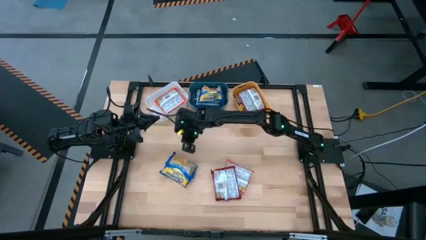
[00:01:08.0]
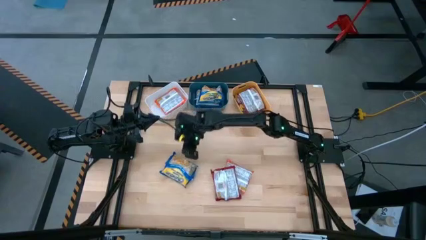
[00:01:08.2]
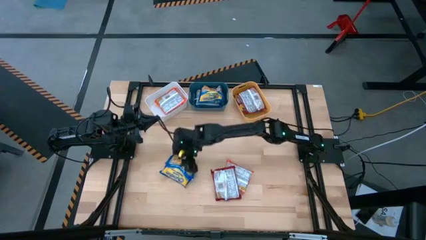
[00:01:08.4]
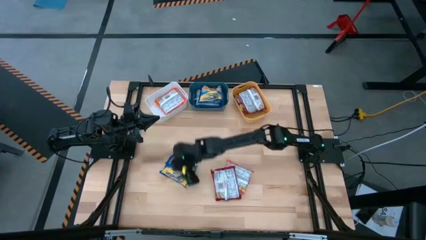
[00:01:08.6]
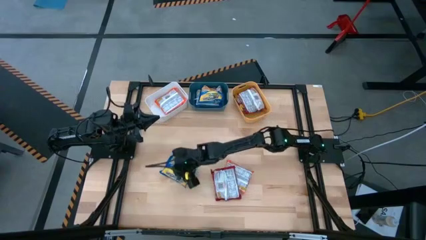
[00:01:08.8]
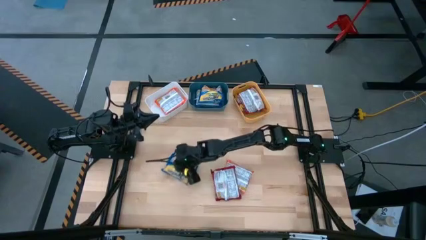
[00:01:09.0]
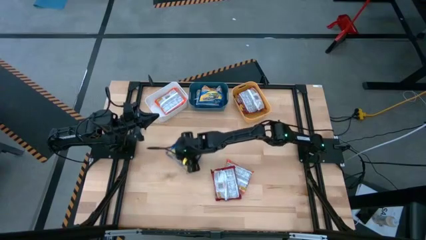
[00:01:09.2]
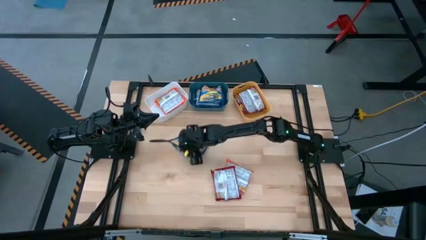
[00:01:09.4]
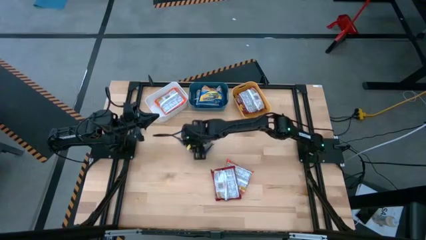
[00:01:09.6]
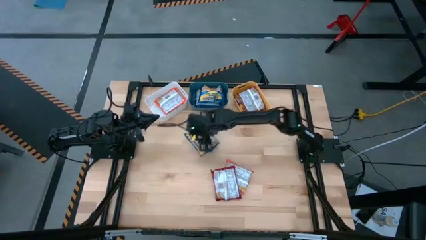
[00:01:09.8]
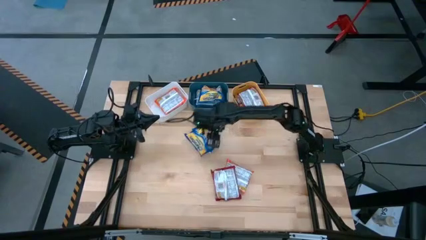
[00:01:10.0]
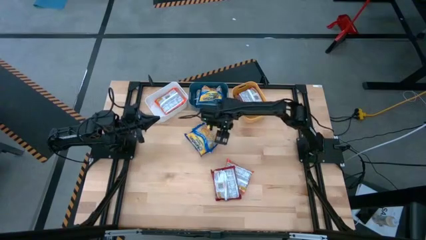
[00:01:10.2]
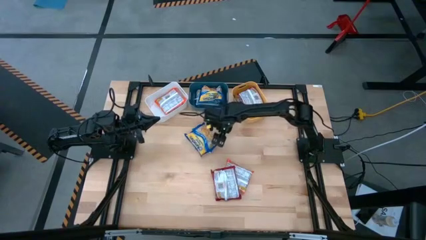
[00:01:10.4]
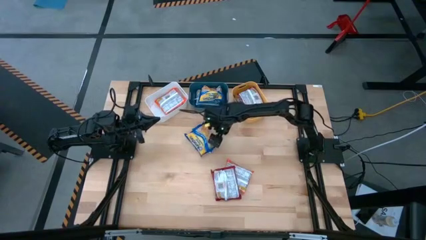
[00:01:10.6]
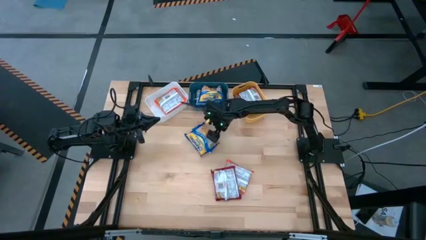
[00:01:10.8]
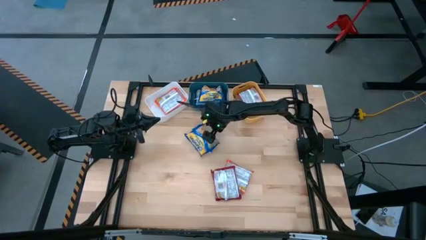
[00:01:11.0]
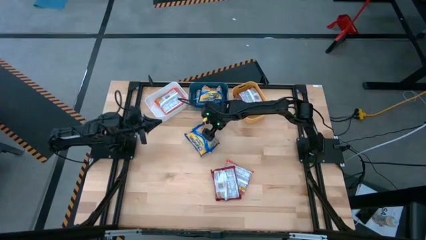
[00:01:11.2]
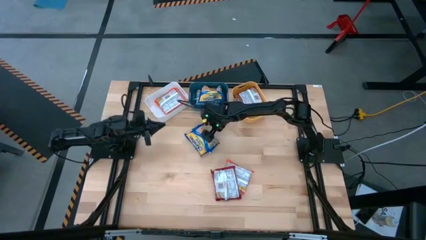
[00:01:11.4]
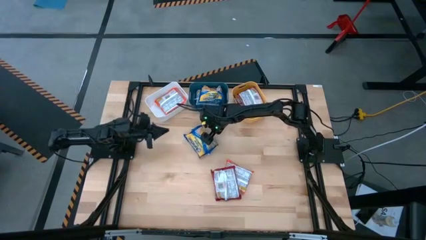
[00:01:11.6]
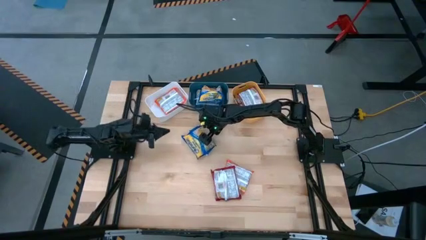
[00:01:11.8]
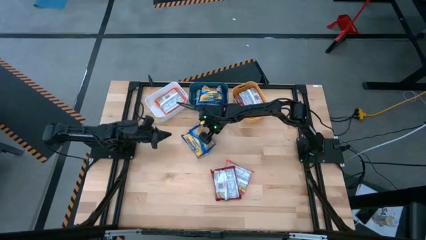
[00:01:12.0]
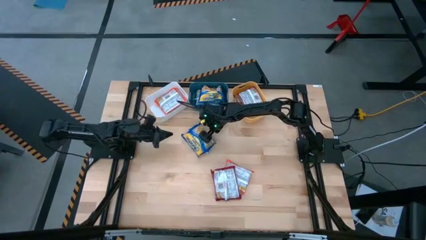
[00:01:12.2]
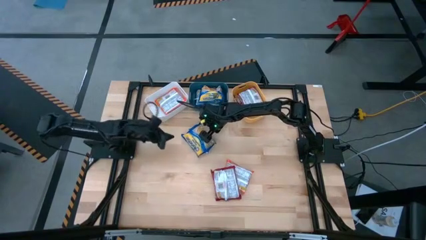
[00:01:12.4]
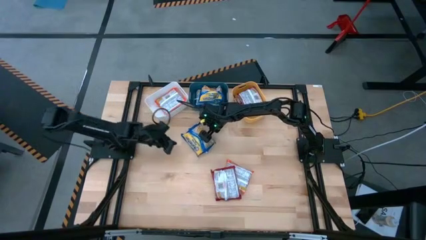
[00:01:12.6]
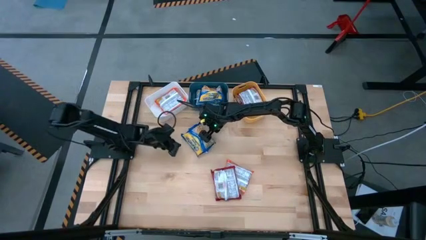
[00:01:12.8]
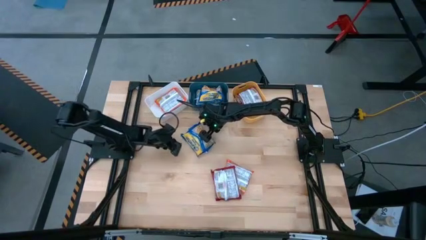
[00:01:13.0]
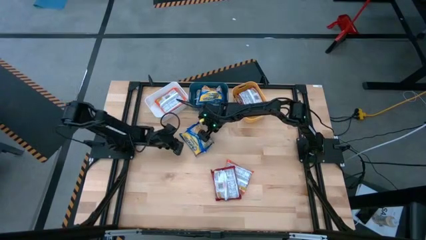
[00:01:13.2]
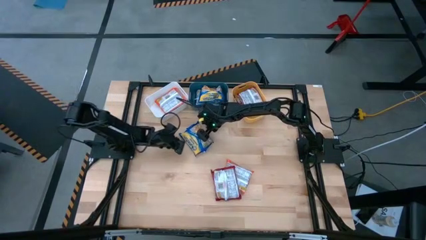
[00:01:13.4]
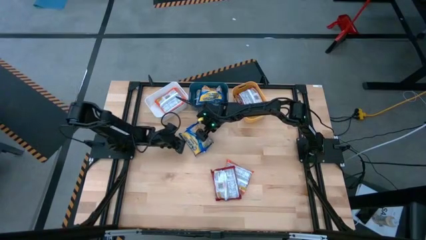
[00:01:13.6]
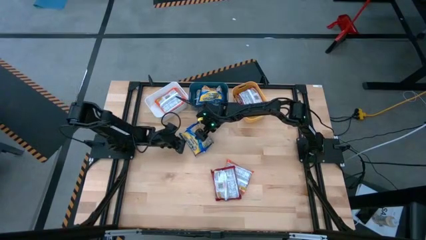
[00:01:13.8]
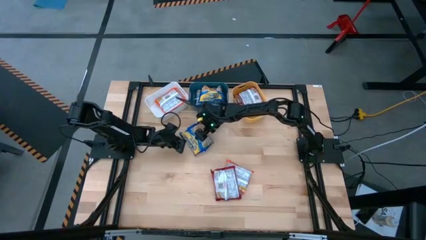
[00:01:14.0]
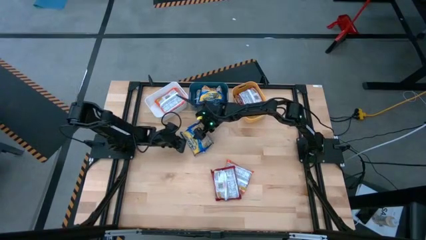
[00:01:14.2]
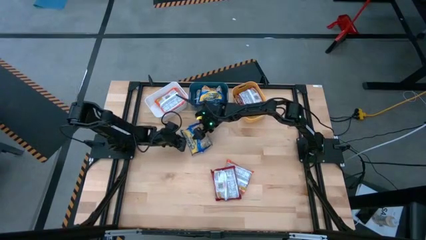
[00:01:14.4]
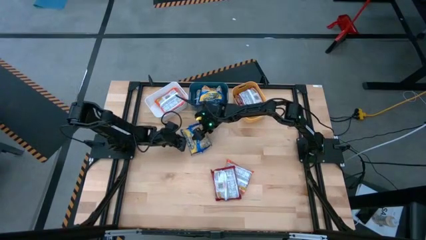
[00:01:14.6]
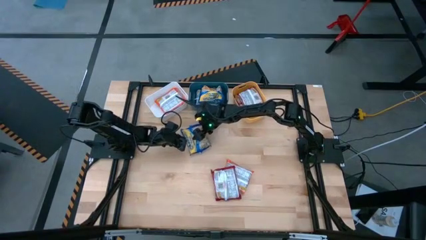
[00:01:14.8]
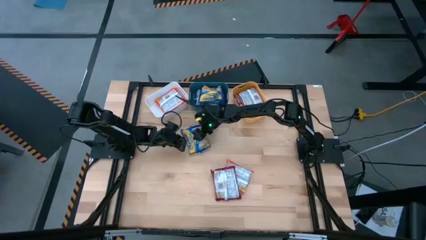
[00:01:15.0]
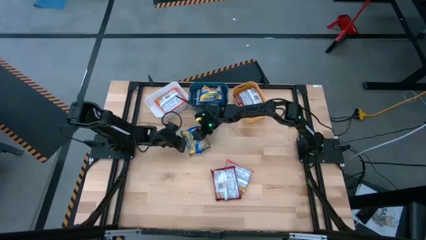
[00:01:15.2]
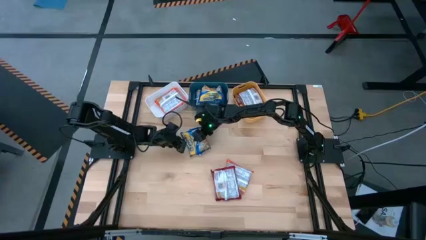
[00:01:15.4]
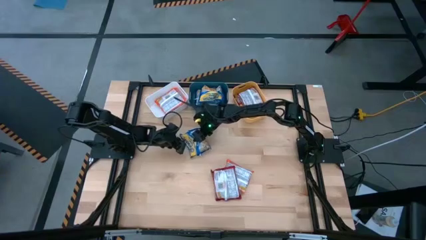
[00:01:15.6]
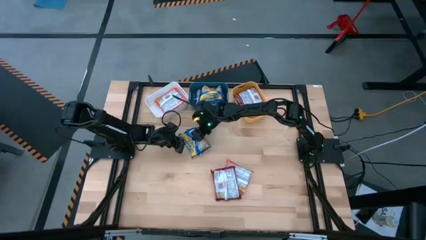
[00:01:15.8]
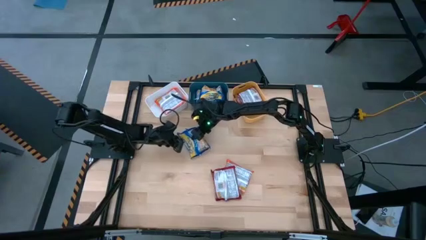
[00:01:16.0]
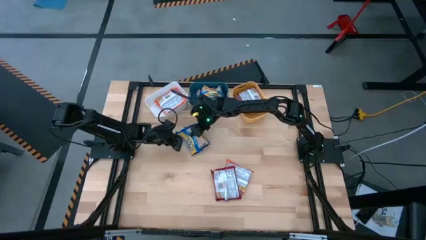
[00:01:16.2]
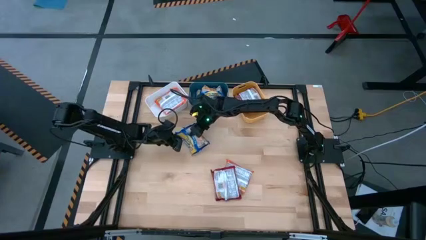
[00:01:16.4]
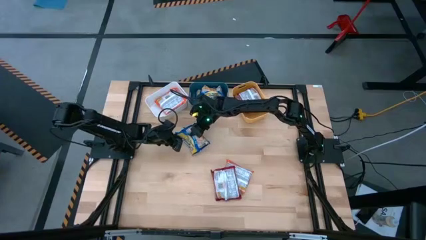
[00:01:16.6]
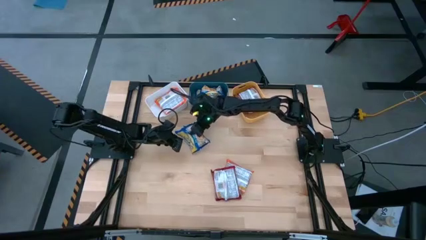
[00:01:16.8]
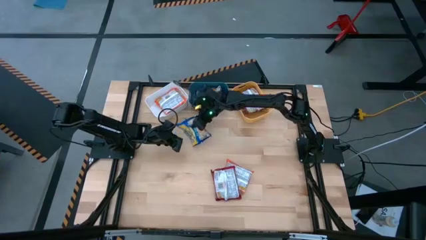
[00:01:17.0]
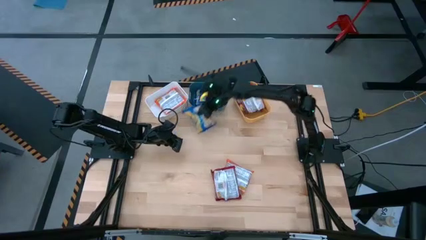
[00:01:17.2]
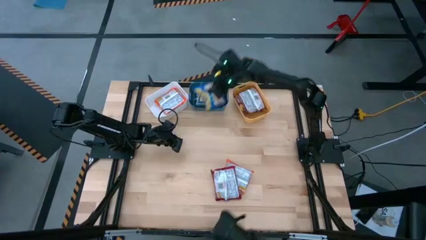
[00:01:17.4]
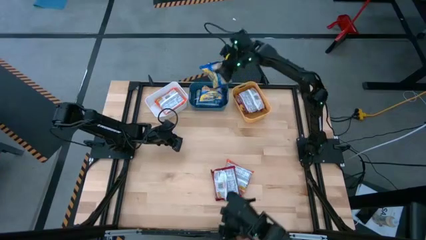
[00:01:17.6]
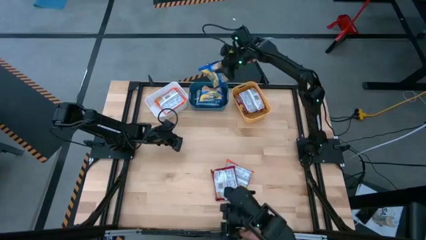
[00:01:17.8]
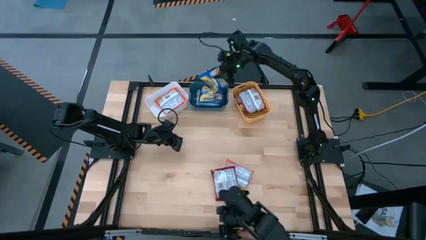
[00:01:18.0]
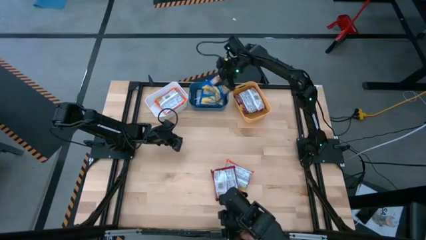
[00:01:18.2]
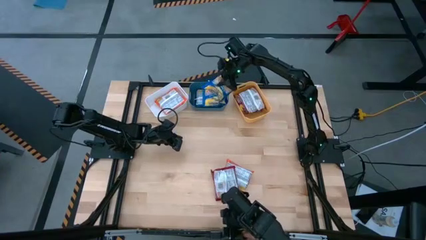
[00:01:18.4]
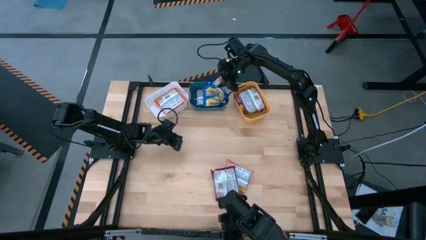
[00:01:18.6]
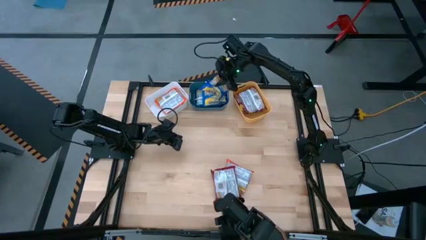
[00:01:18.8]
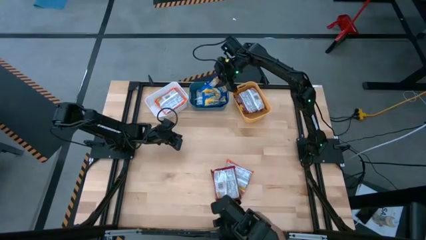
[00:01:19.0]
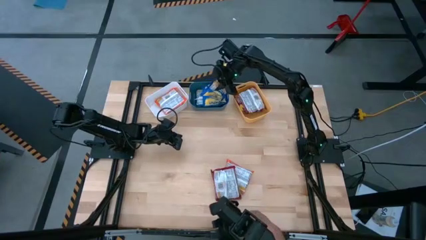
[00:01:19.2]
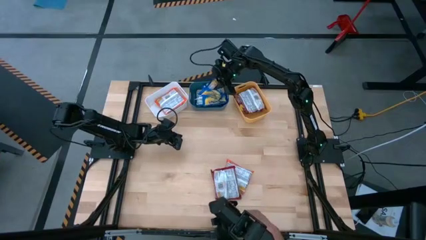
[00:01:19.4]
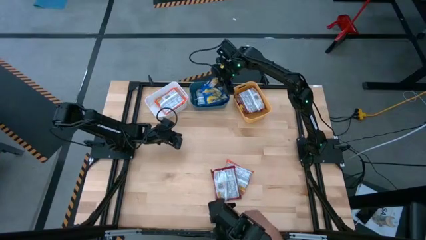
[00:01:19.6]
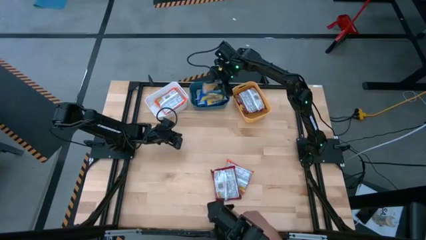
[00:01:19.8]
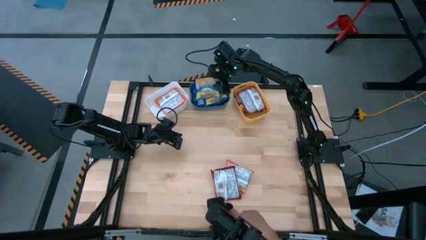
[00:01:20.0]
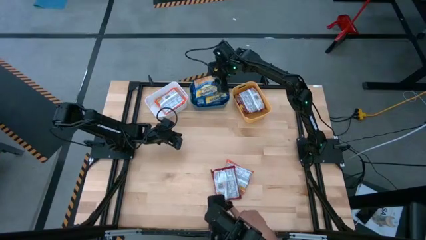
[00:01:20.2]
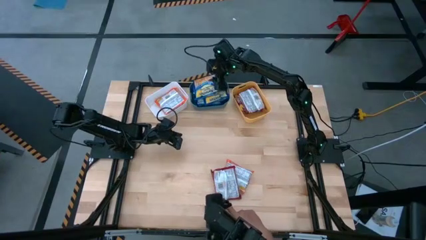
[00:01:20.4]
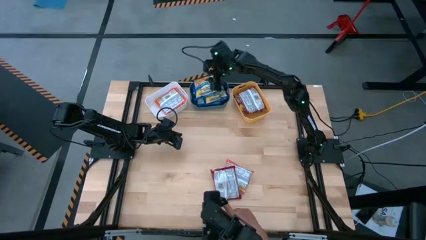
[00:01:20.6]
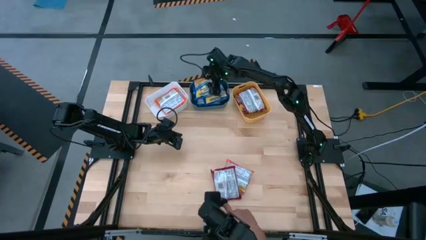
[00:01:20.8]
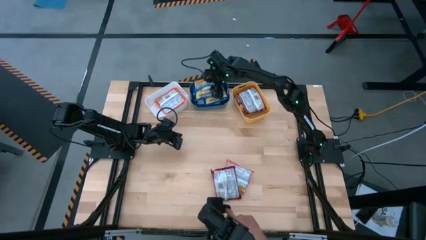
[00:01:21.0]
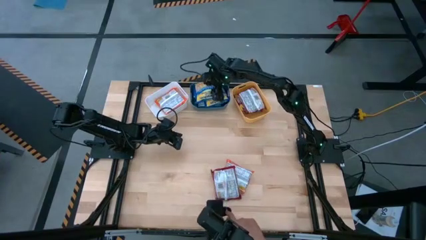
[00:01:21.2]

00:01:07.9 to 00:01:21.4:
Task: Sort Maruchan noodles
Put the blue noodle pack into the blue bin

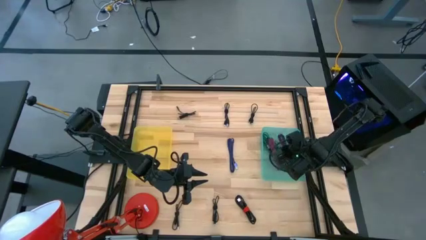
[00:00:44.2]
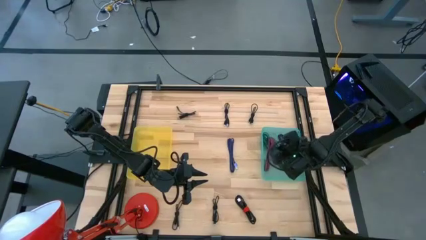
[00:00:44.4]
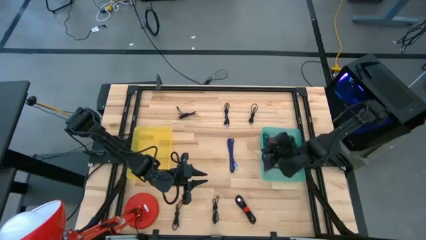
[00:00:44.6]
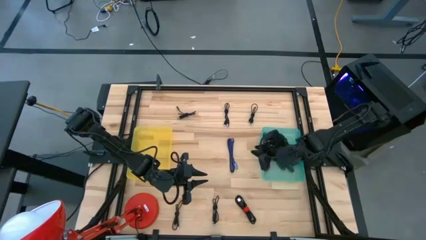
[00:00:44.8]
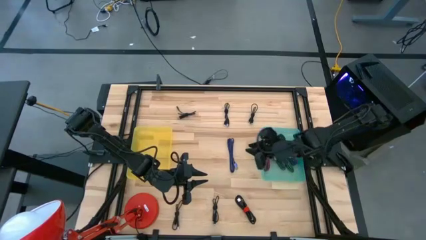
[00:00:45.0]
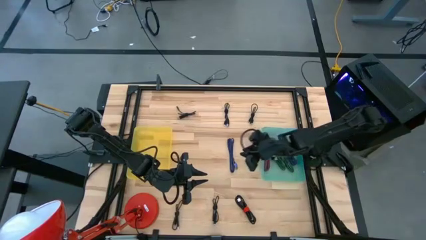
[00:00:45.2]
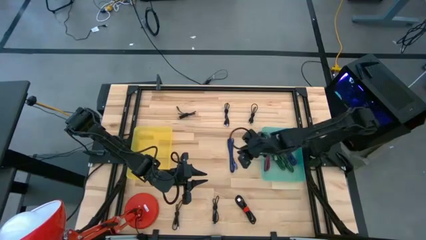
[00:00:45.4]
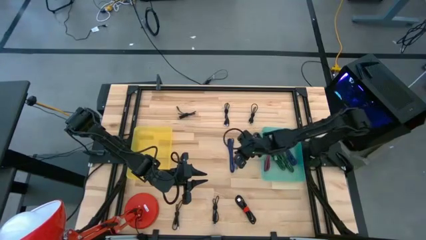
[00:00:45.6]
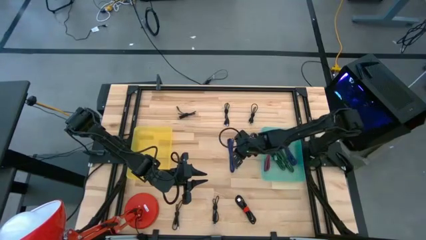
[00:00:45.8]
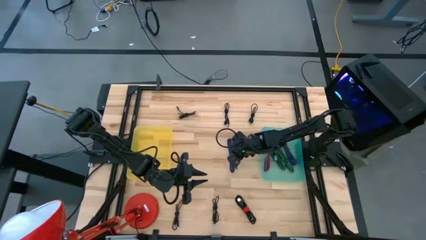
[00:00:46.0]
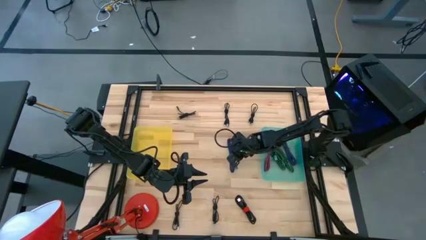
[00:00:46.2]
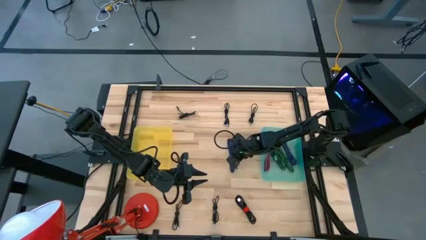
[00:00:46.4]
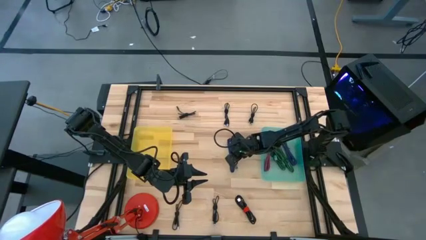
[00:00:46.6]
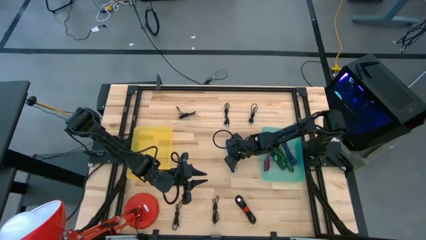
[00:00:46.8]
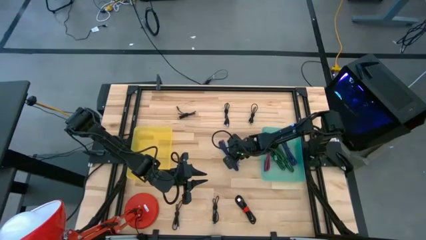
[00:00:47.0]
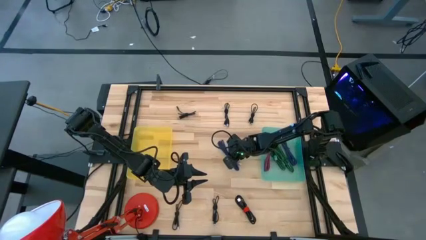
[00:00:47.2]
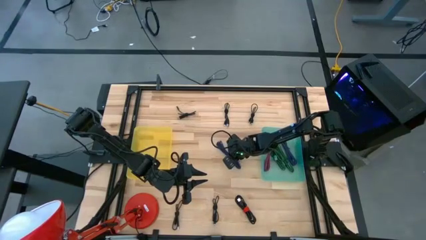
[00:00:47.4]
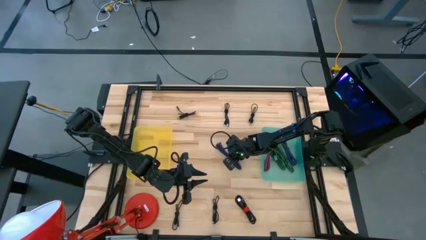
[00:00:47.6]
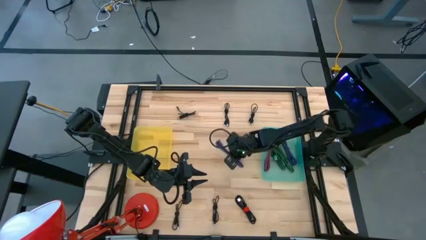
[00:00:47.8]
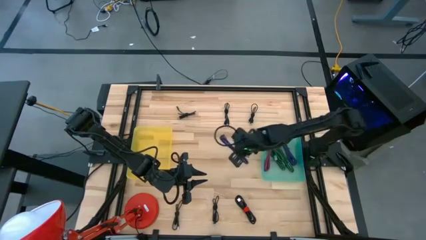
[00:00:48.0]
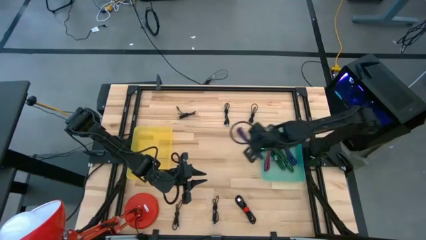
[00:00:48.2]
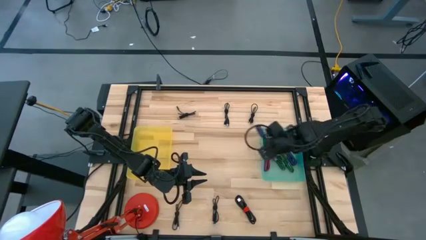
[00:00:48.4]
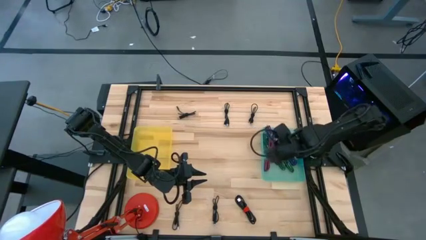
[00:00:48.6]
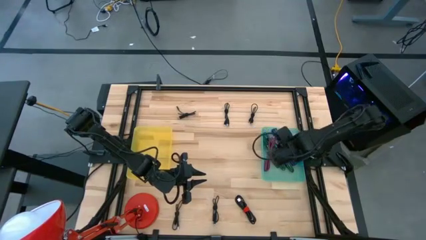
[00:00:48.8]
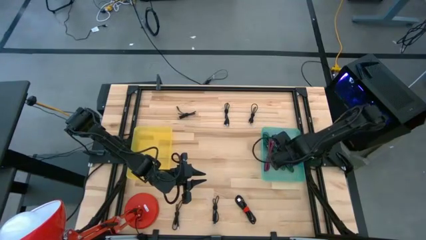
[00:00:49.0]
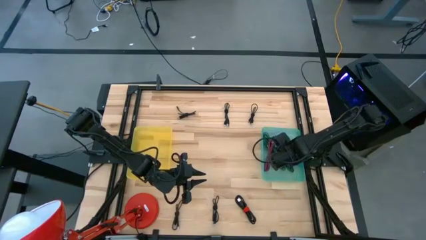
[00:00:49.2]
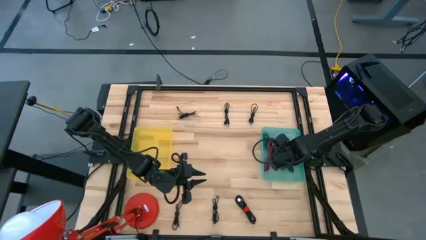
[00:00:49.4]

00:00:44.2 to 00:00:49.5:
Task: Pick & Place USB Port
Put the purple and white charger cable into the light green bin
